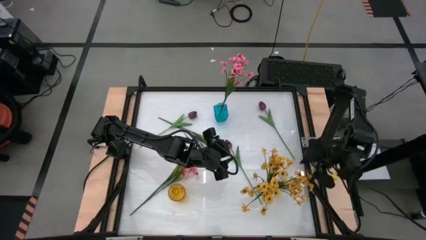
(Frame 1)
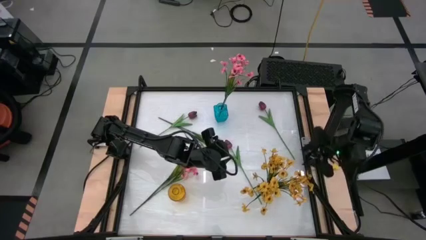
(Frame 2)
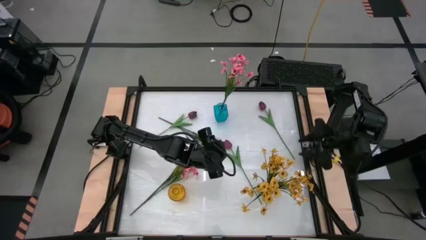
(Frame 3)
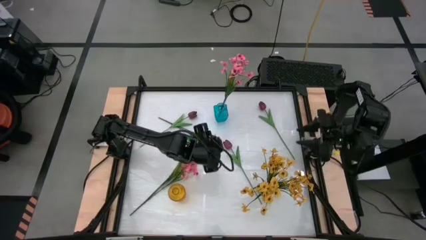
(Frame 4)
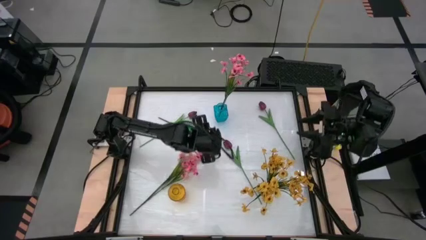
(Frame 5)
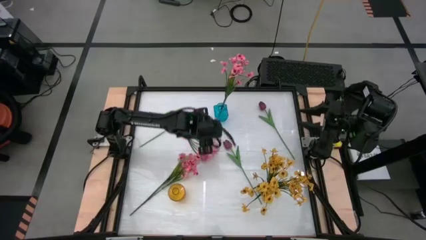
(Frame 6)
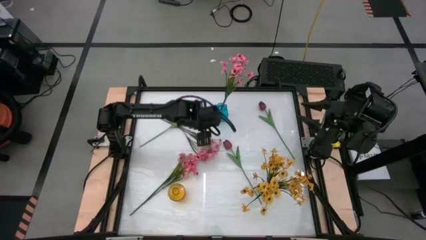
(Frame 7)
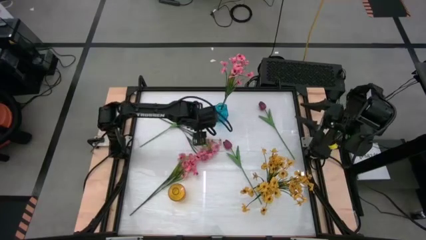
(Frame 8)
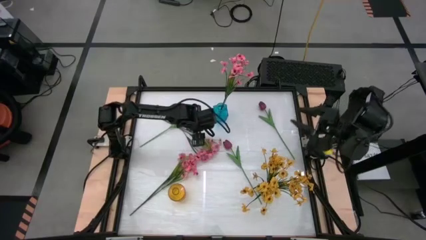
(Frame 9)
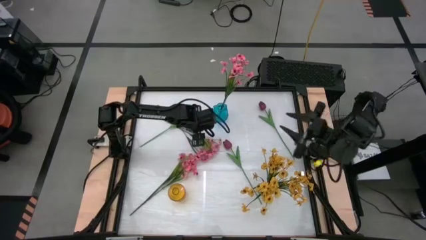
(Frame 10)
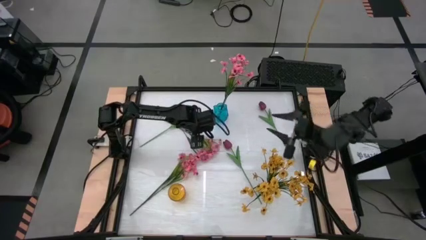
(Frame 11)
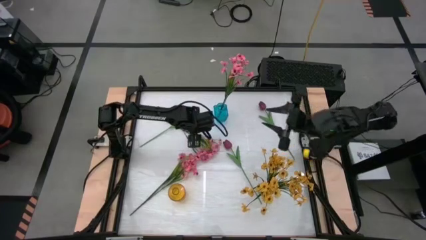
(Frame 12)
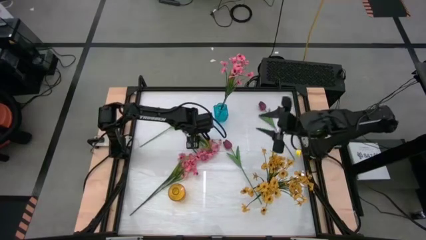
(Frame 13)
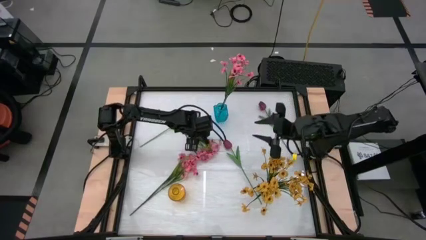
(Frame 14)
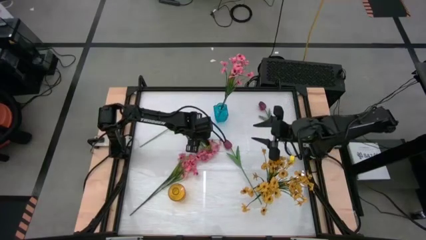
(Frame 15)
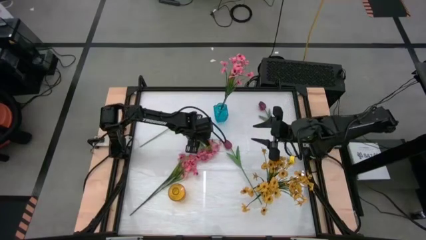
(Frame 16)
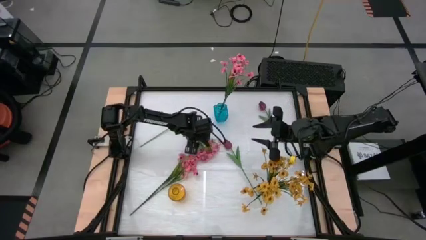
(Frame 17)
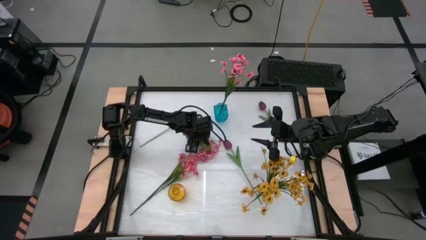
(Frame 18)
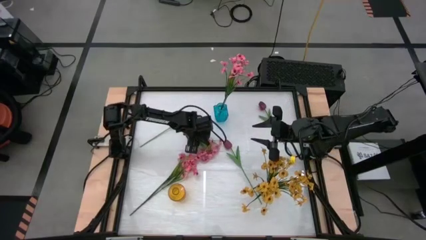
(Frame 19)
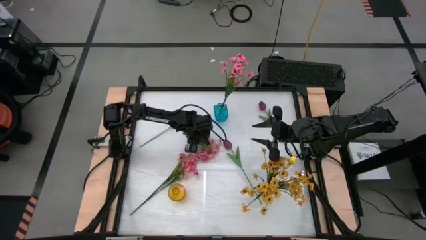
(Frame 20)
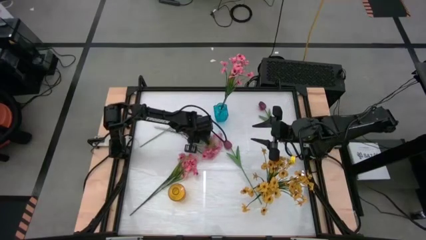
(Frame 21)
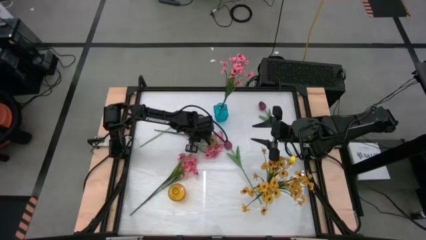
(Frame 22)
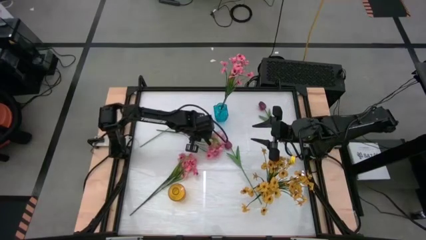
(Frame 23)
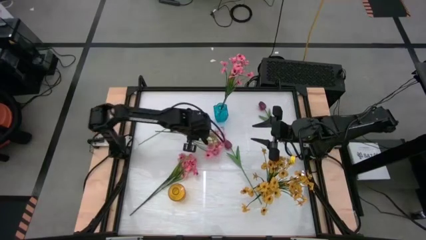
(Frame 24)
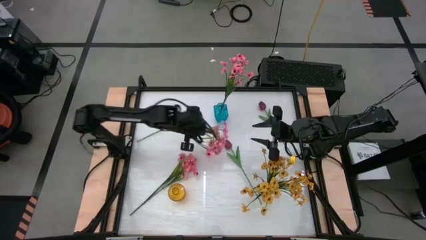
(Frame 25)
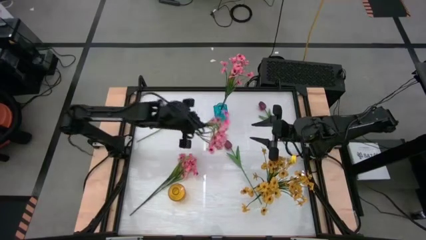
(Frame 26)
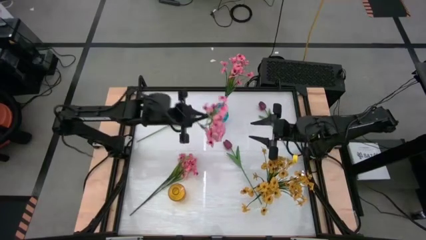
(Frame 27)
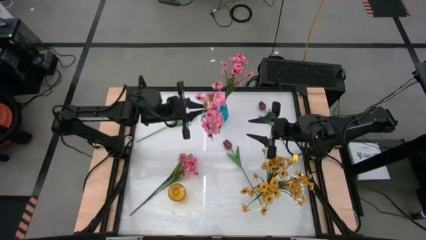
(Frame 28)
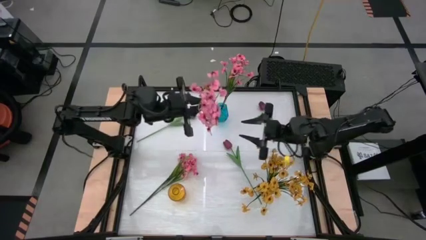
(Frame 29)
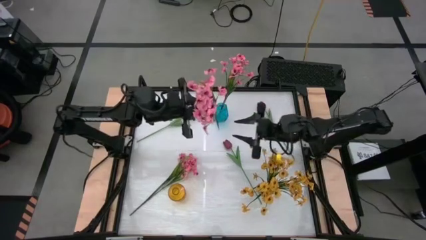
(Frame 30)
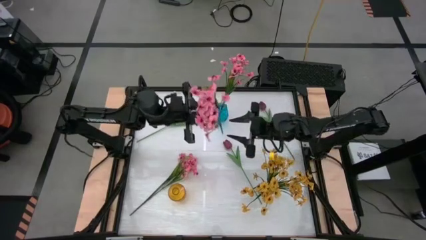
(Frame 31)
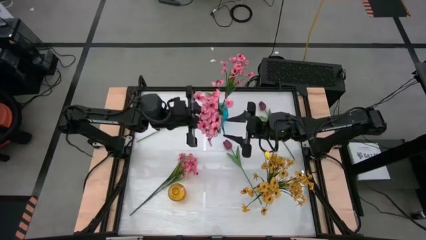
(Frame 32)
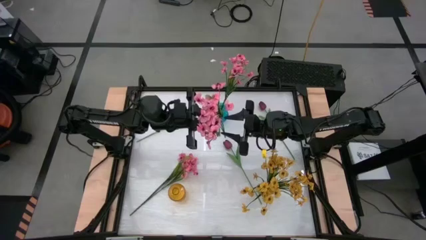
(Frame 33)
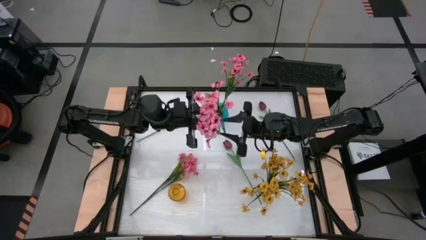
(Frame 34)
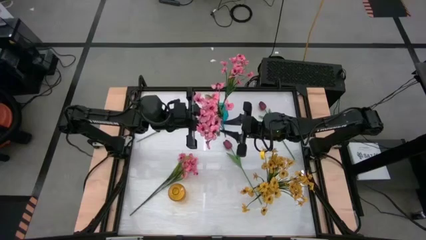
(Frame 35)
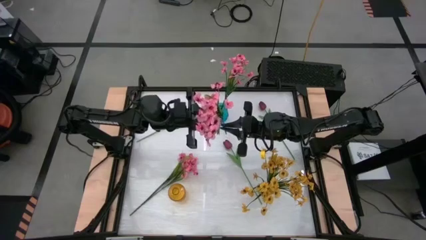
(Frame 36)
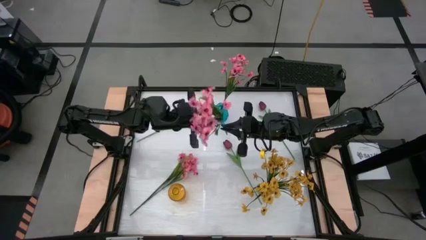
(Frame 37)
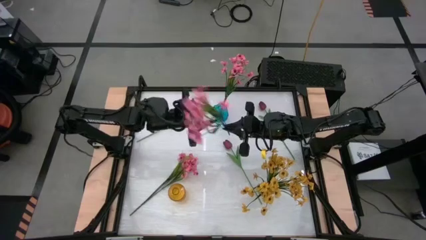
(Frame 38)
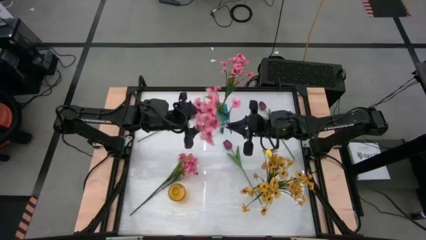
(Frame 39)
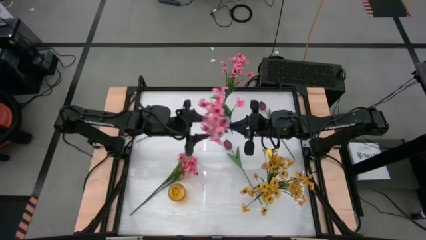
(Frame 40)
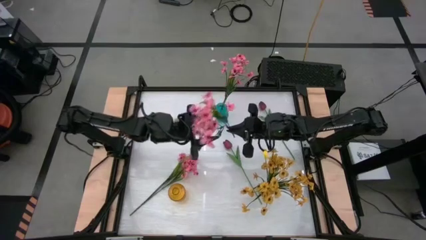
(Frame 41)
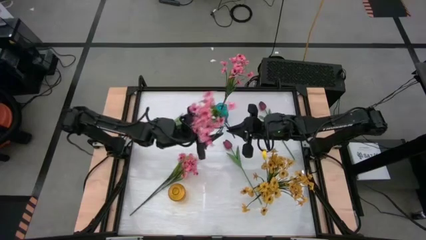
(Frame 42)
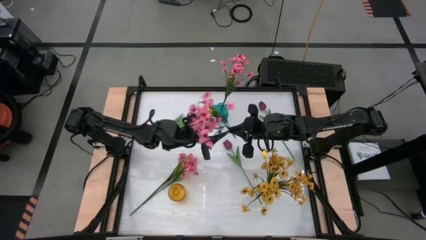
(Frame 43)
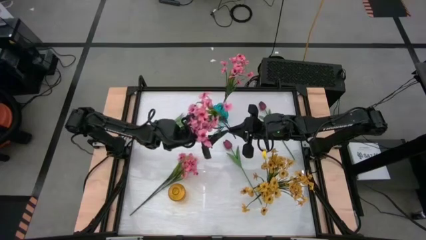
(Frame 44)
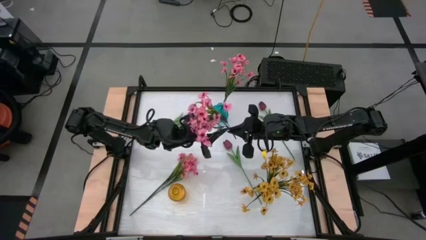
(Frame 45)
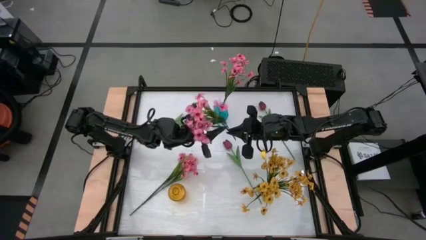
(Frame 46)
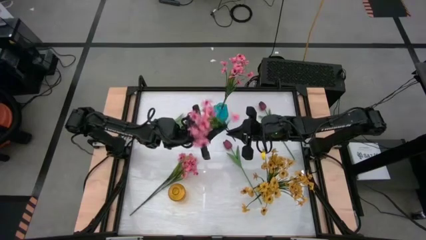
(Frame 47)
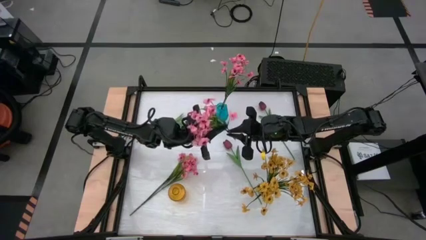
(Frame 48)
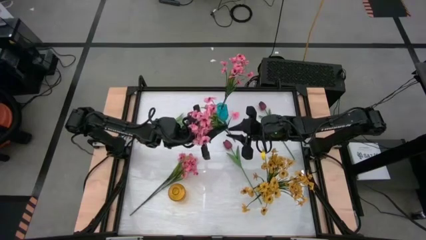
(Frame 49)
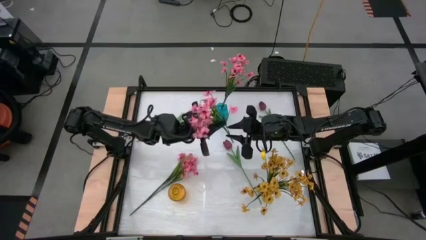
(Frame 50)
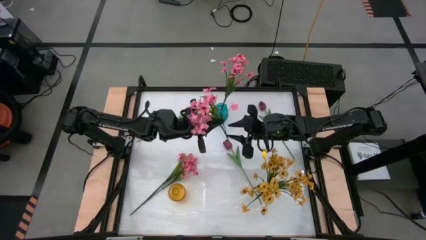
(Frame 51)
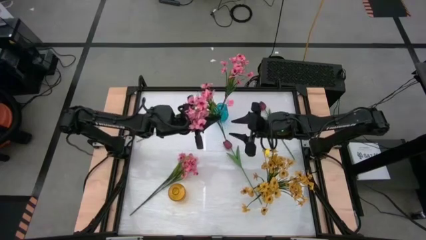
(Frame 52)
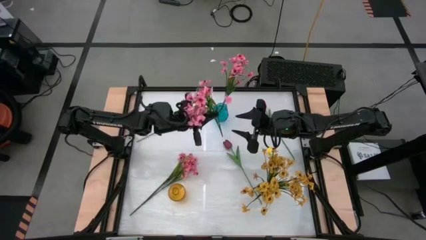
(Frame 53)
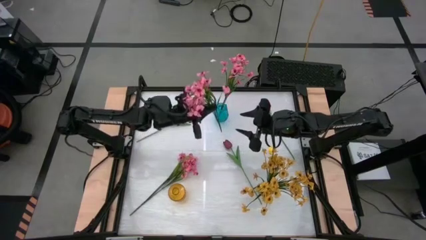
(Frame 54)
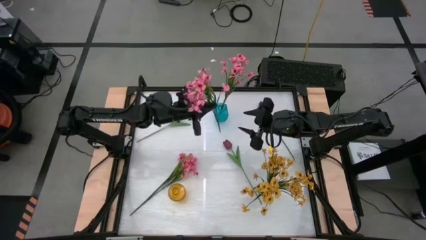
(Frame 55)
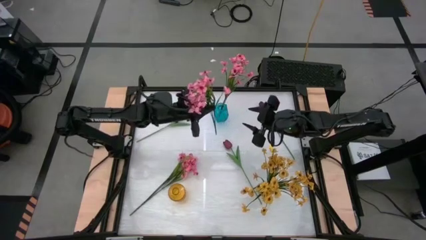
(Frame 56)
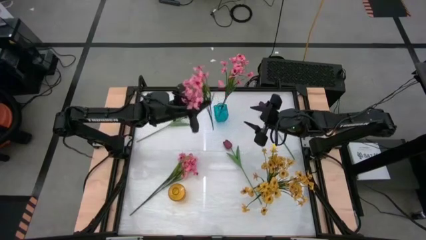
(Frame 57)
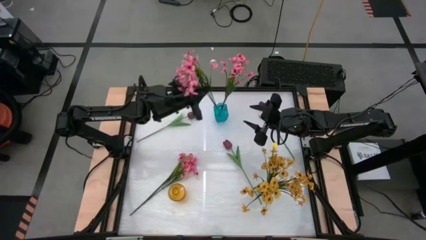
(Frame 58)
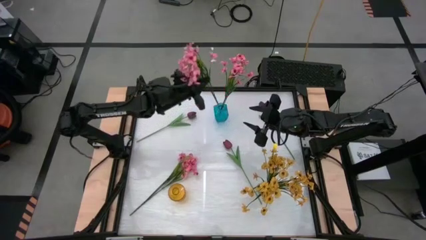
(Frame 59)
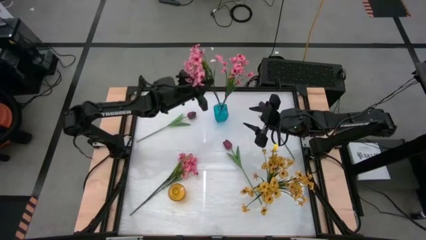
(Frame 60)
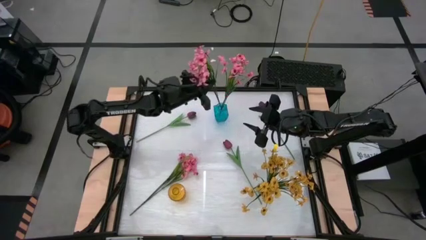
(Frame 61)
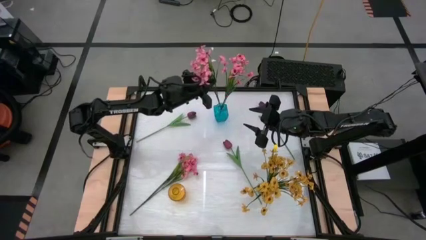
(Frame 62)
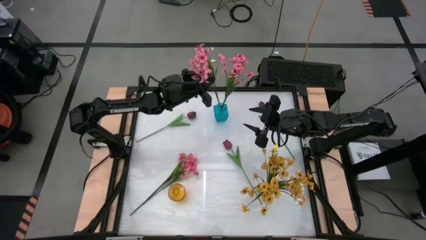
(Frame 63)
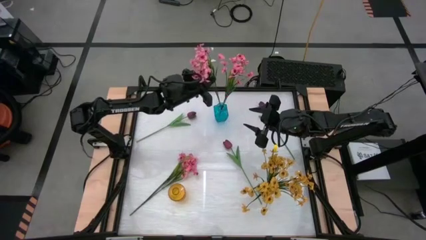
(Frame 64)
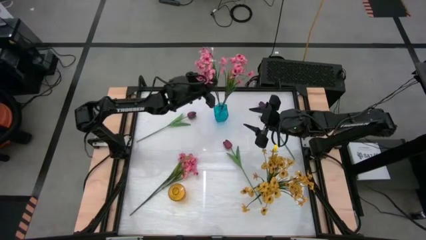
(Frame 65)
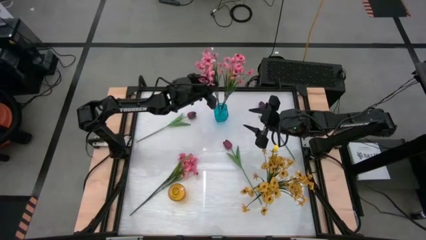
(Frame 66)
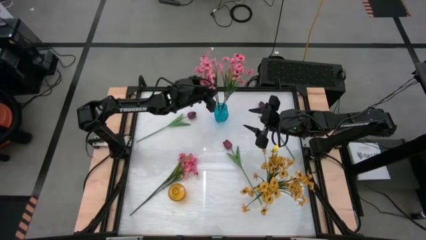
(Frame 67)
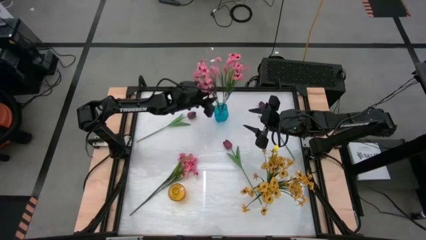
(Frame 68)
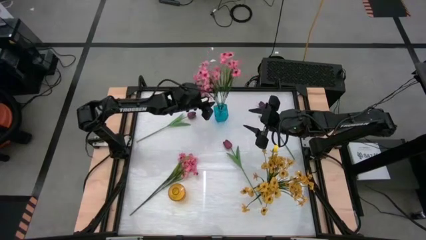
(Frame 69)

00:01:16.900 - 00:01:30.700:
Task: Sort flowers into vase by color
Put the top pink flowers into the blue vase

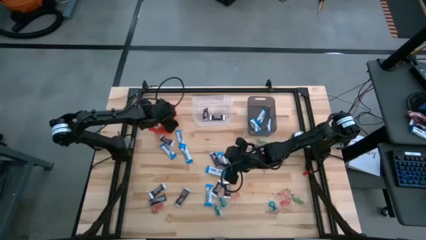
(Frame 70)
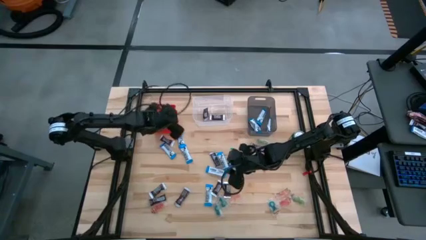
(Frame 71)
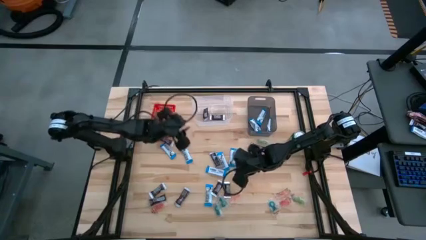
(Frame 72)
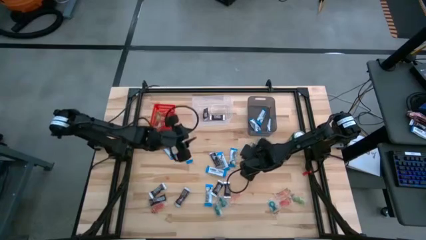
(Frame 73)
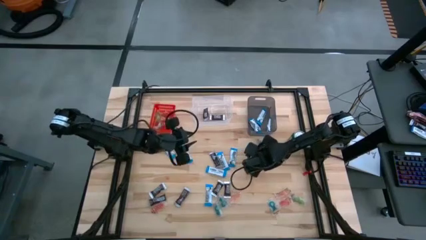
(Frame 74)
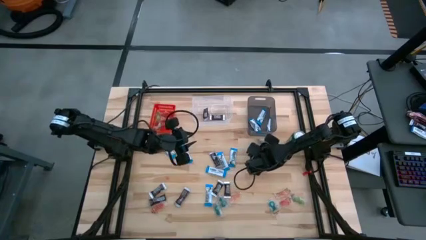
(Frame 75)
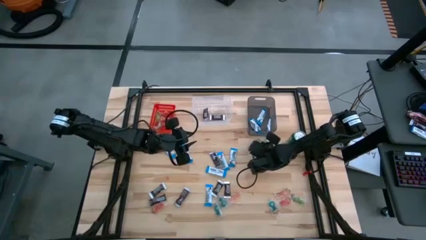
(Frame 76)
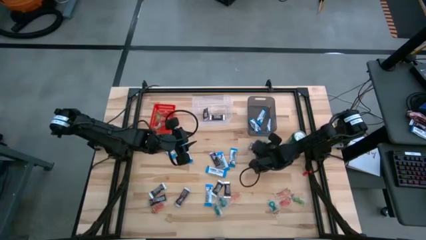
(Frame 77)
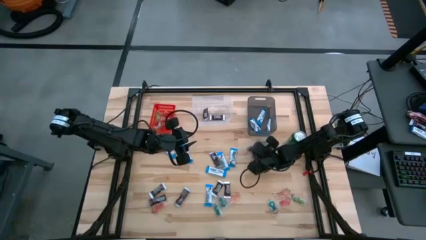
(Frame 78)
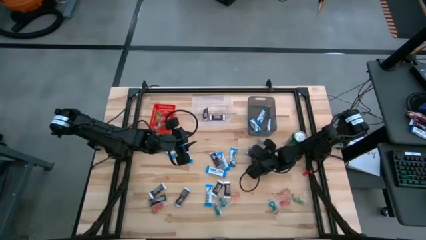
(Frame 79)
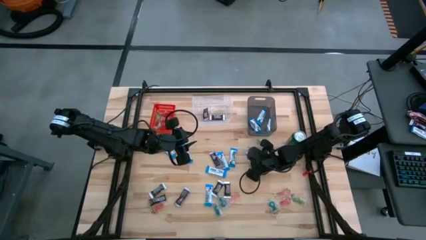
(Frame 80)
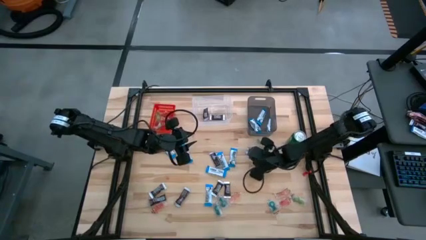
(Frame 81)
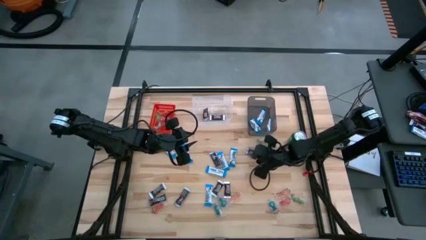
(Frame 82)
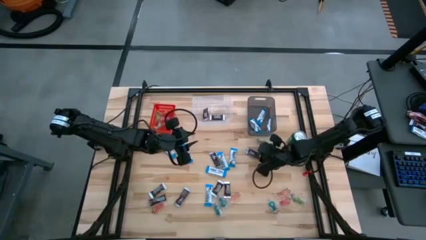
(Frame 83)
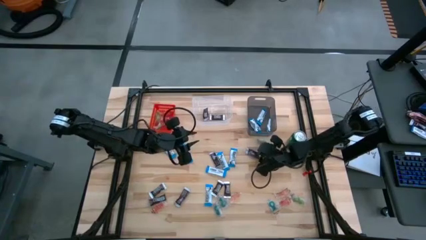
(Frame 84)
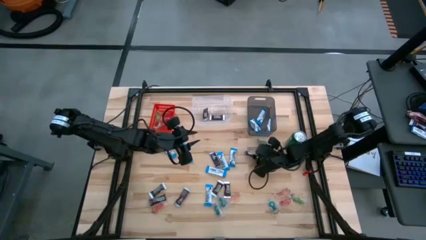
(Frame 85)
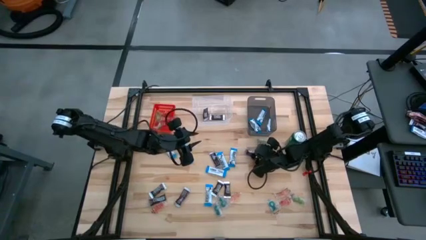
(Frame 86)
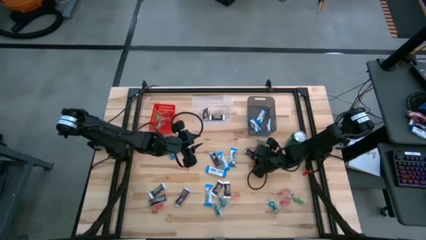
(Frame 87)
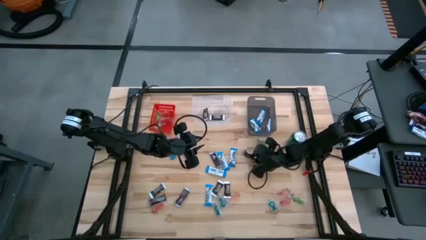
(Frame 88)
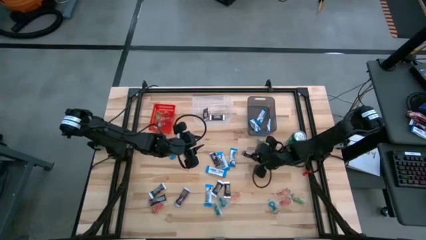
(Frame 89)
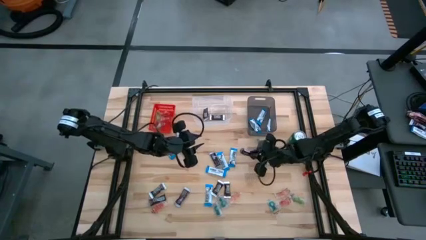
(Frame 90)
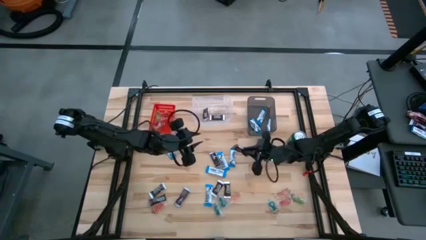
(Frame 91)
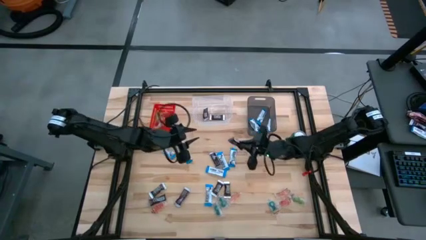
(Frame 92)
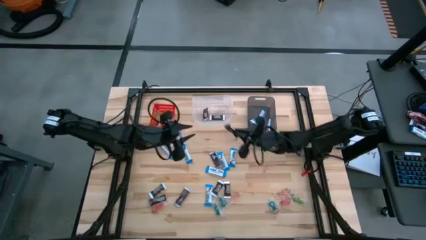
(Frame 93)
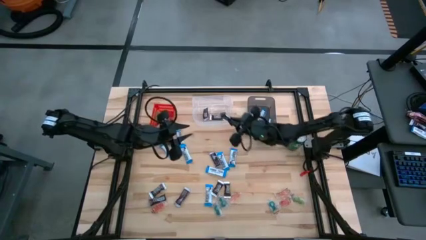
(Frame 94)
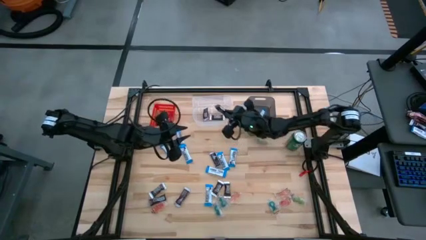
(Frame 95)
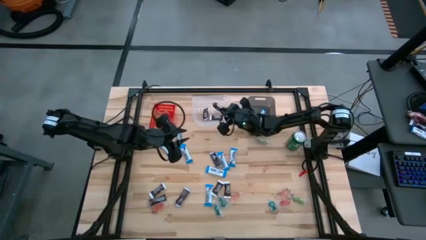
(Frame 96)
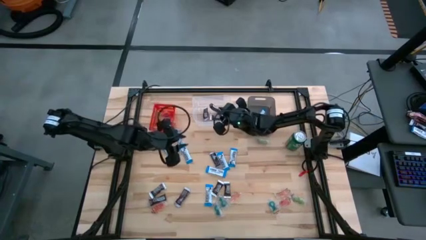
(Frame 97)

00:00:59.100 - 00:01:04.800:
Task: Sort candy
Put the black candy into the transparent bin
